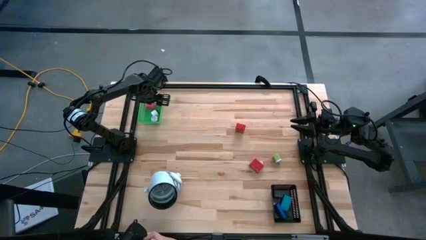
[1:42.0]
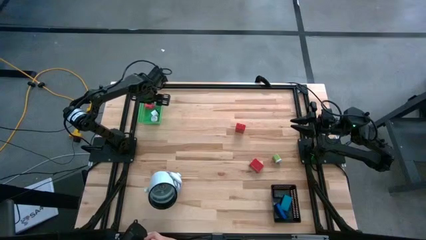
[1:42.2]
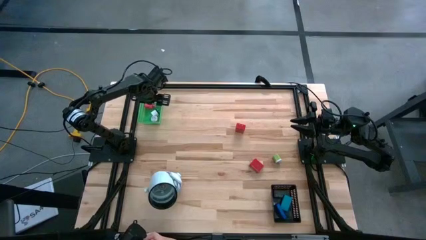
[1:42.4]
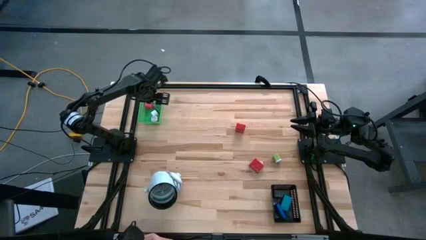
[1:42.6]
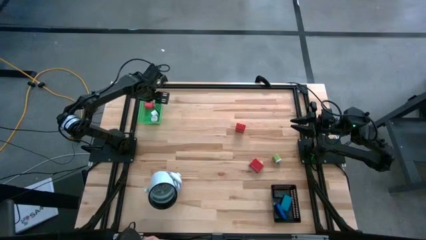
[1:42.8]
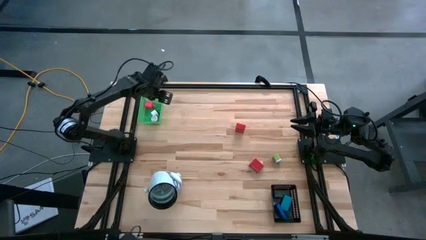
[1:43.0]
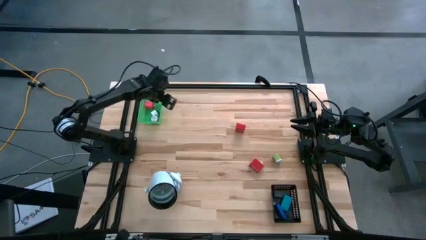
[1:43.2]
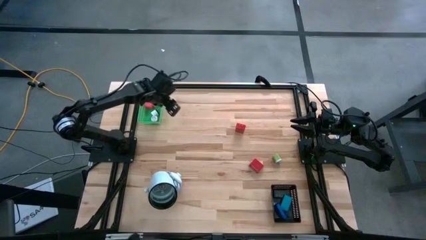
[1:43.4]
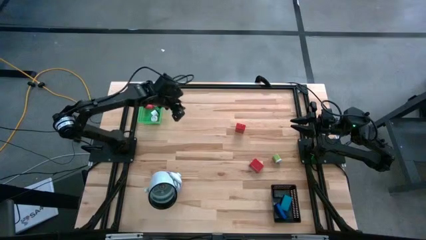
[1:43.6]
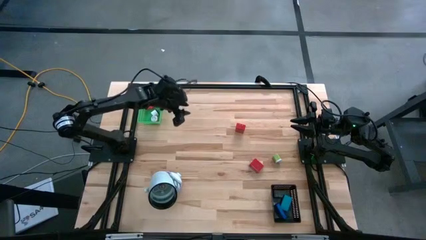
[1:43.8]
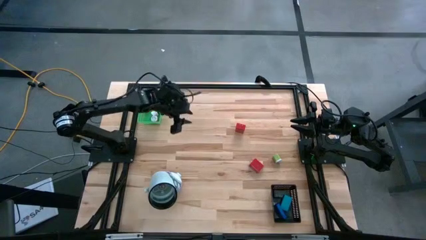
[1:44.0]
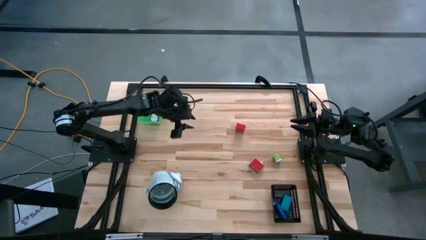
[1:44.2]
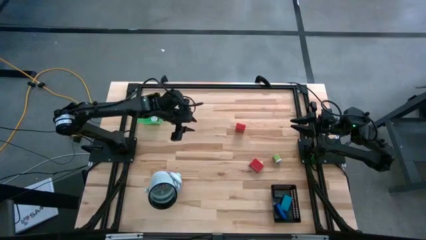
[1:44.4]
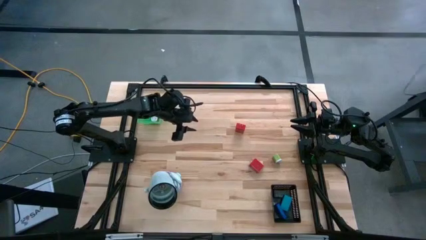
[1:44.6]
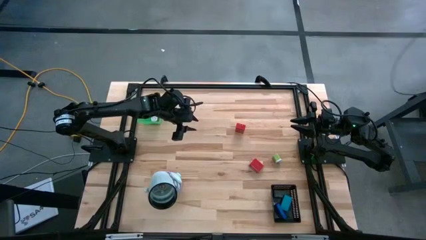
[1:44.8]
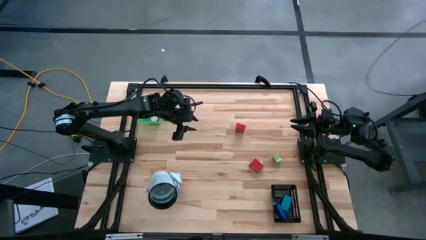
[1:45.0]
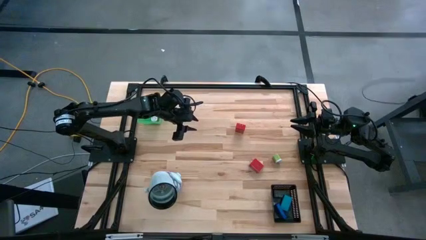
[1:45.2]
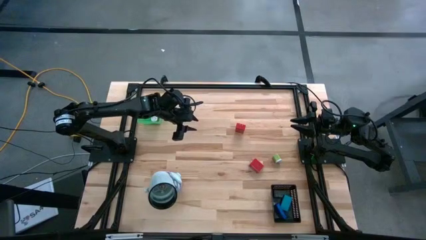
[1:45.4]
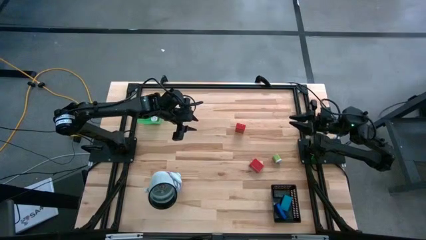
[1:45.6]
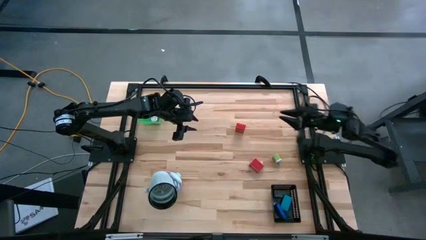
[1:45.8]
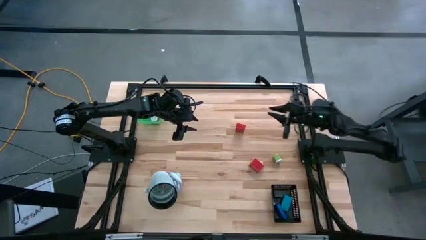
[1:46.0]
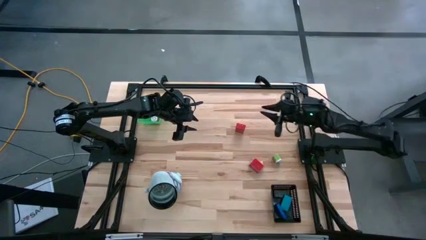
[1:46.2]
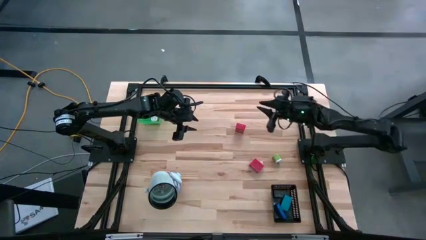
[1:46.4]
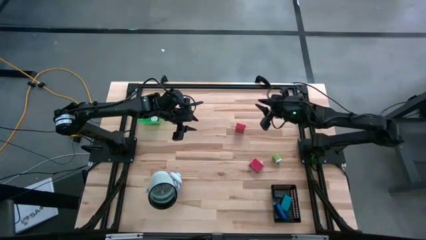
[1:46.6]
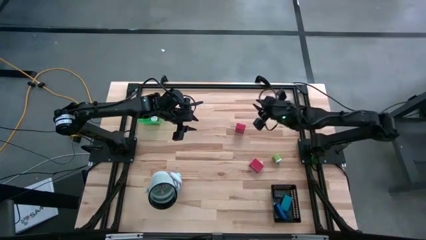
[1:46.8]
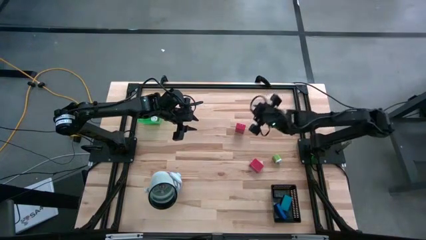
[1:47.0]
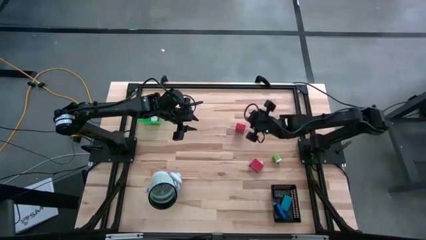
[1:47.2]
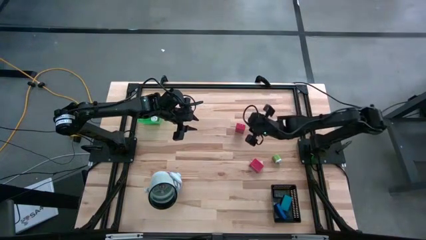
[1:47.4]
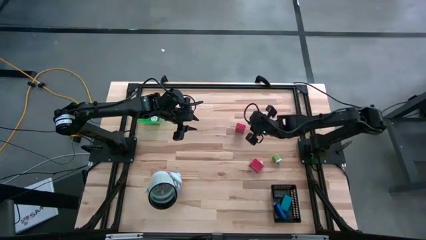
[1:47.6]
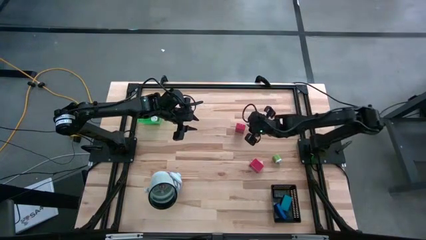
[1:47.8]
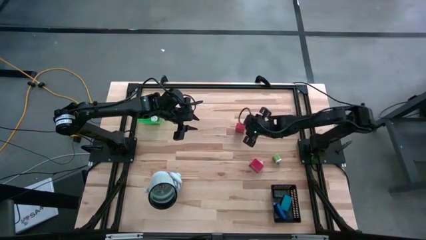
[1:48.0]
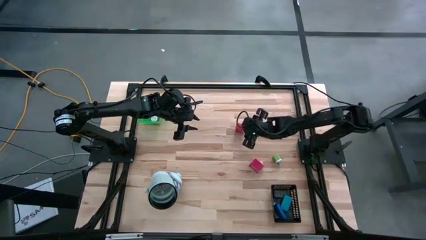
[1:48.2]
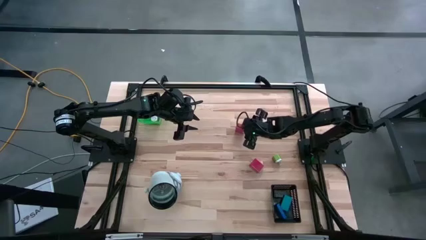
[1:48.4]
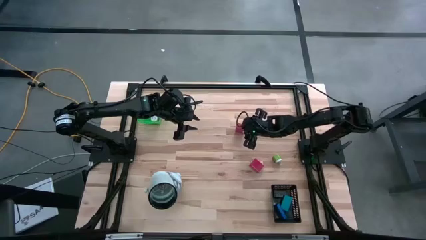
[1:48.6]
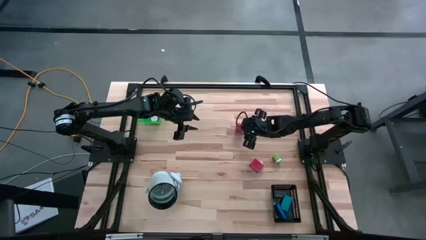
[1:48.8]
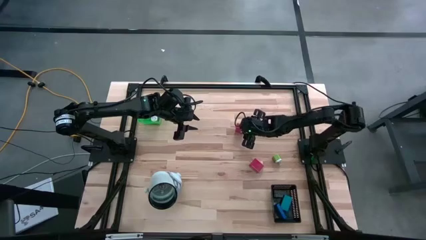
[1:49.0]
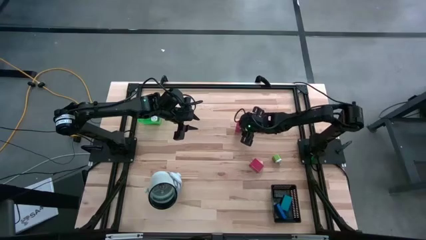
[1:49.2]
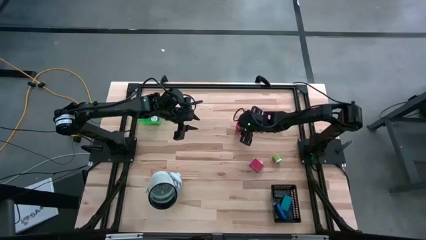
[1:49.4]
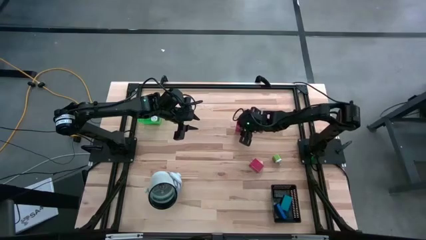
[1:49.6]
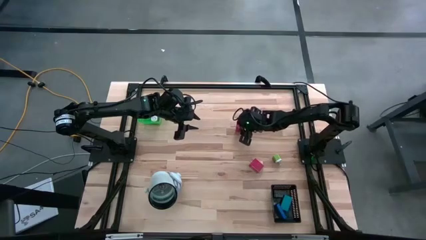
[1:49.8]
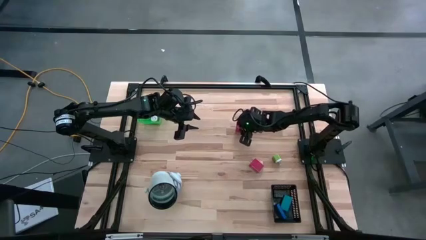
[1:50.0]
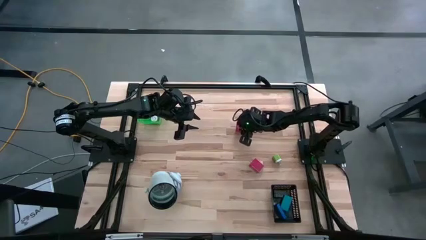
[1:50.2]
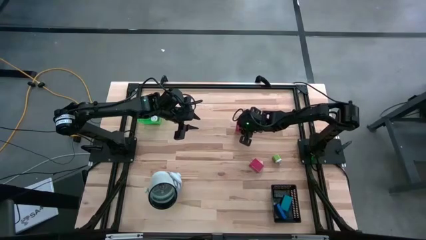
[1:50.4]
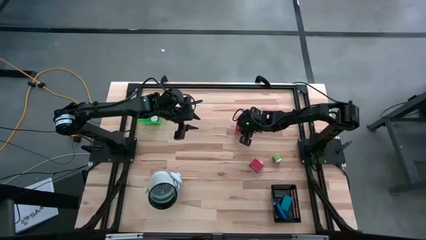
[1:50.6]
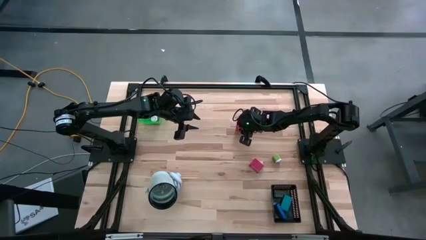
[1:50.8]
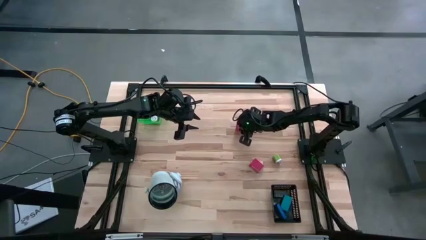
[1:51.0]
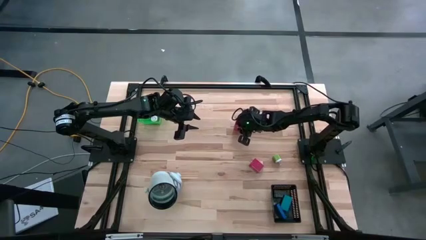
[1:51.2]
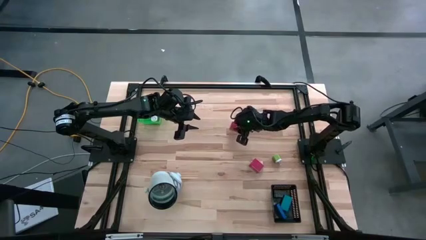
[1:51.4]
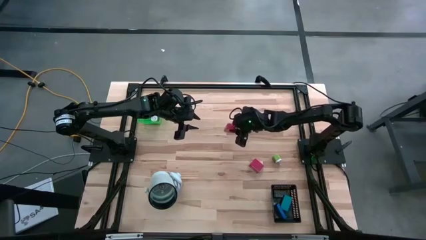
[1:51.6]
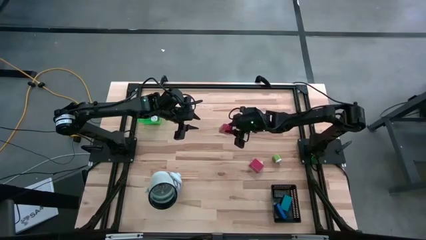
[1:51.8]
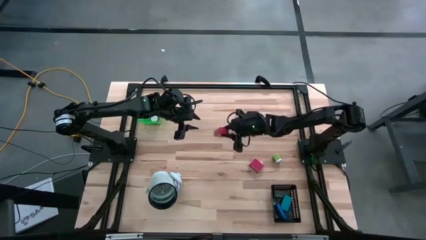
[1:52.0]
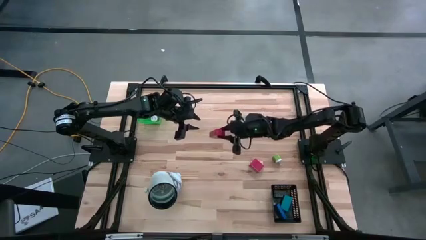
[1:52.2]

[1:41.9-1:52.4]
Task: Pick & Place Office items
Put the top red charger adapter into the green bin

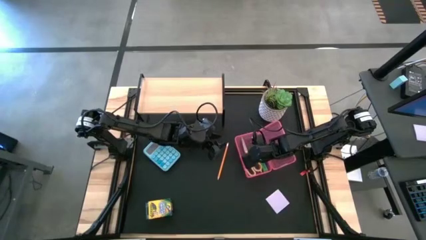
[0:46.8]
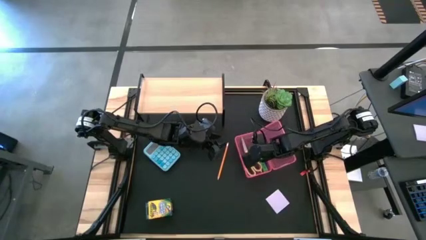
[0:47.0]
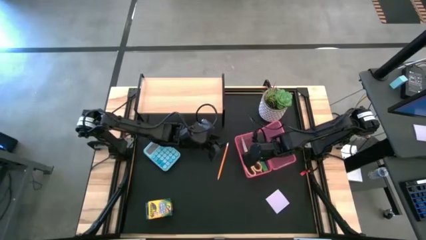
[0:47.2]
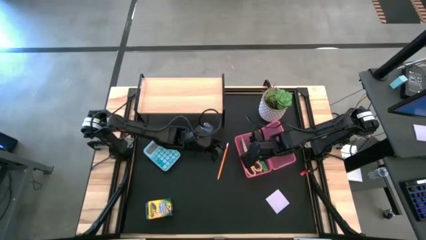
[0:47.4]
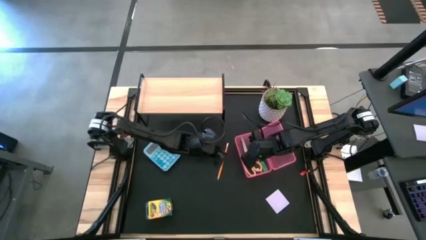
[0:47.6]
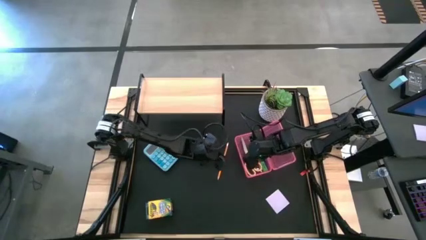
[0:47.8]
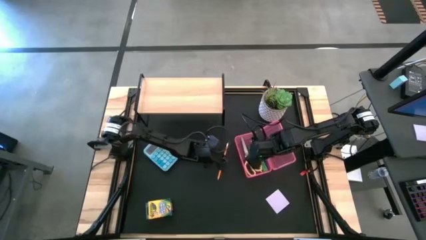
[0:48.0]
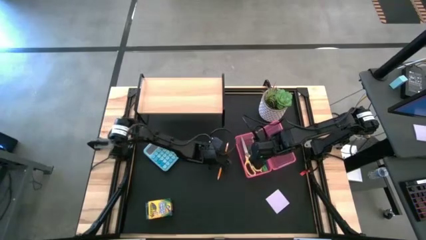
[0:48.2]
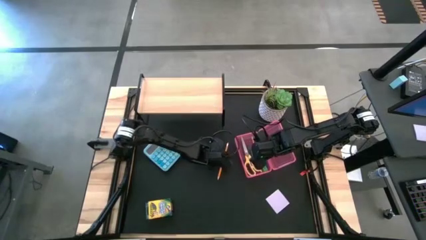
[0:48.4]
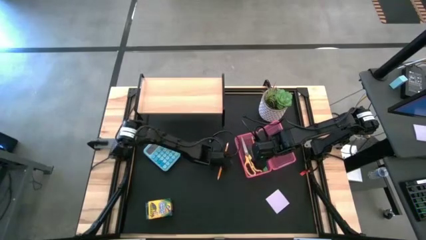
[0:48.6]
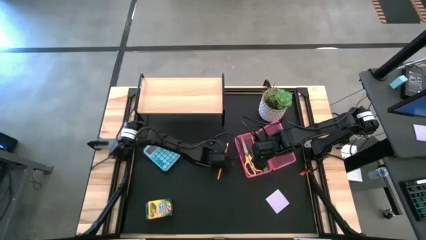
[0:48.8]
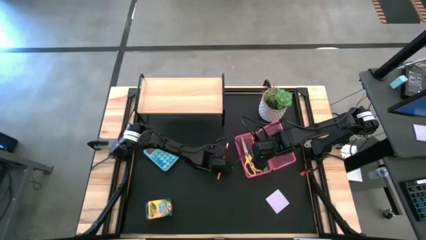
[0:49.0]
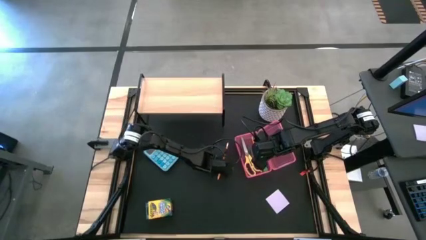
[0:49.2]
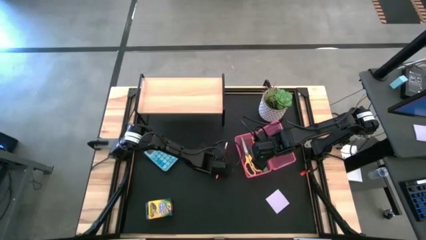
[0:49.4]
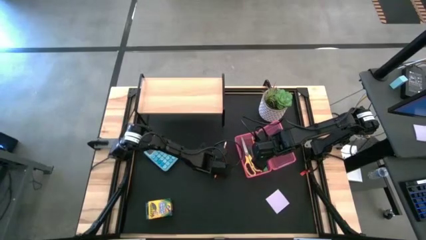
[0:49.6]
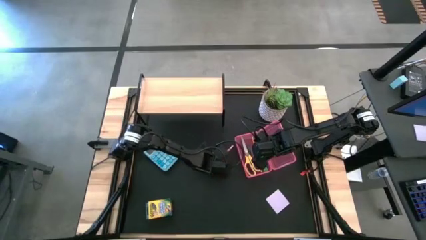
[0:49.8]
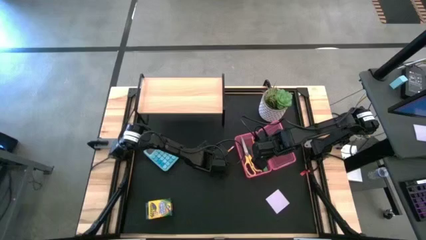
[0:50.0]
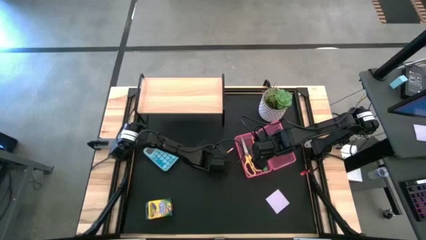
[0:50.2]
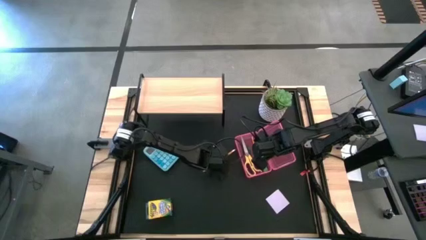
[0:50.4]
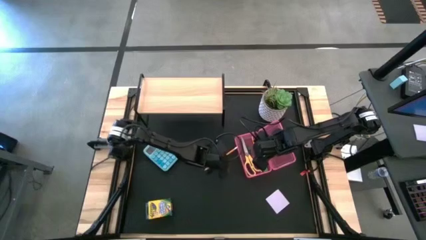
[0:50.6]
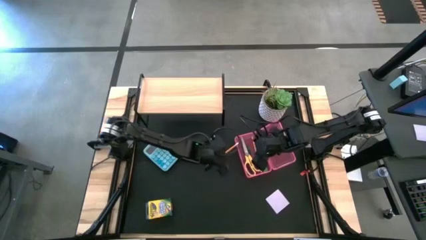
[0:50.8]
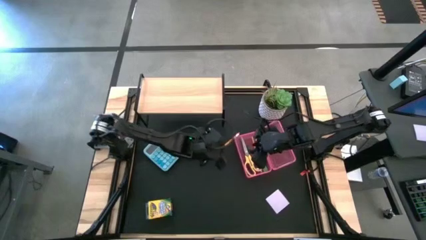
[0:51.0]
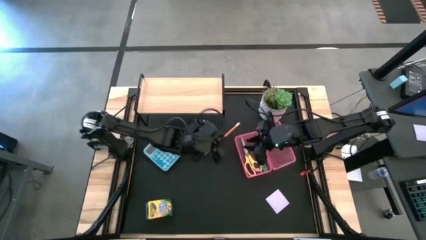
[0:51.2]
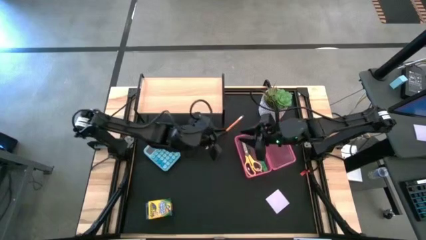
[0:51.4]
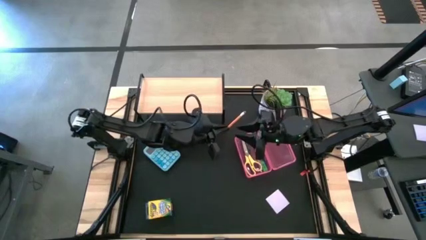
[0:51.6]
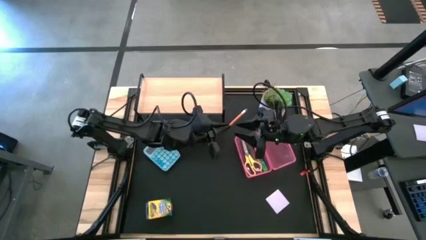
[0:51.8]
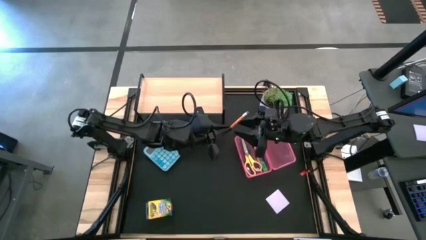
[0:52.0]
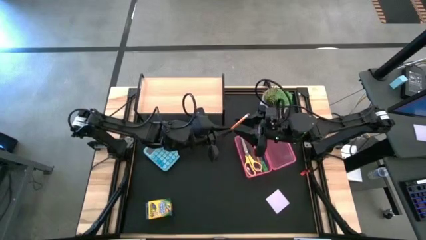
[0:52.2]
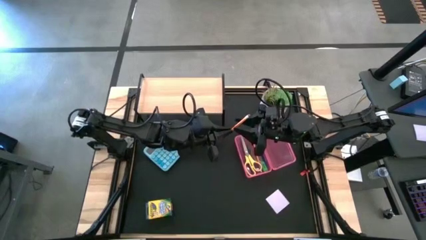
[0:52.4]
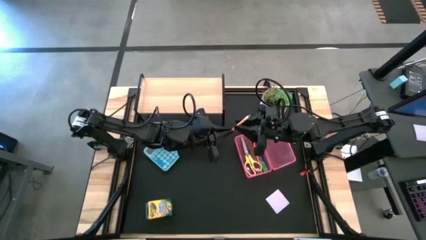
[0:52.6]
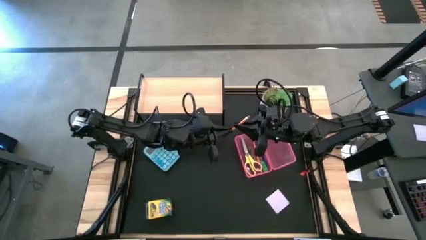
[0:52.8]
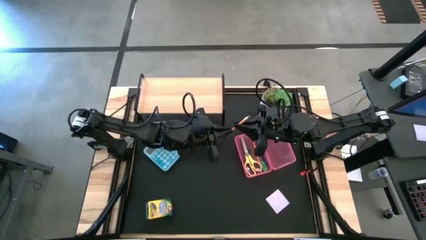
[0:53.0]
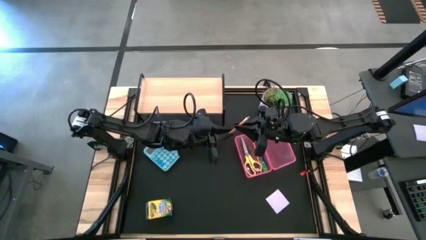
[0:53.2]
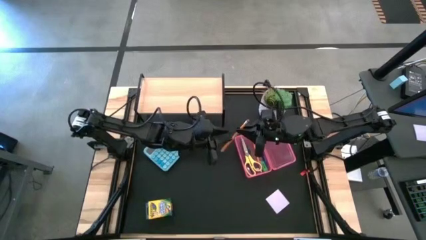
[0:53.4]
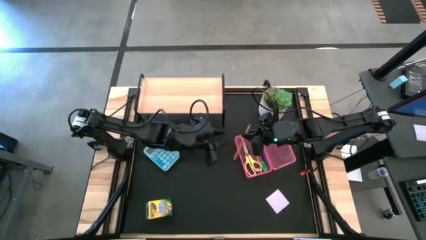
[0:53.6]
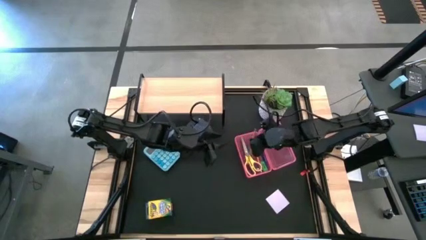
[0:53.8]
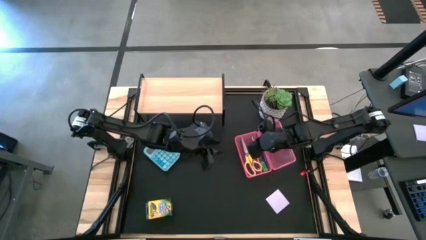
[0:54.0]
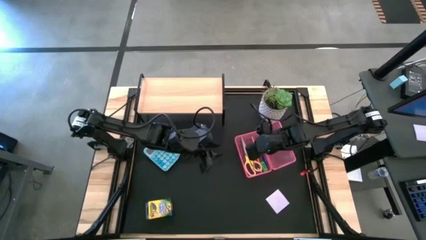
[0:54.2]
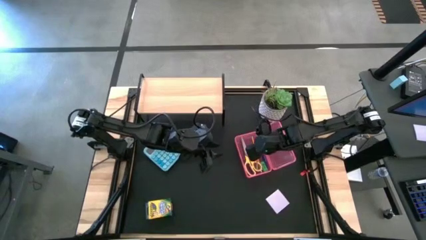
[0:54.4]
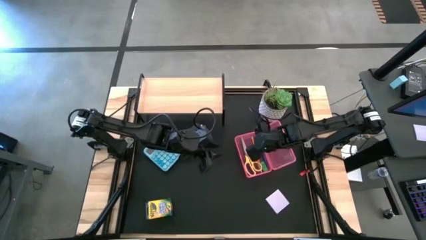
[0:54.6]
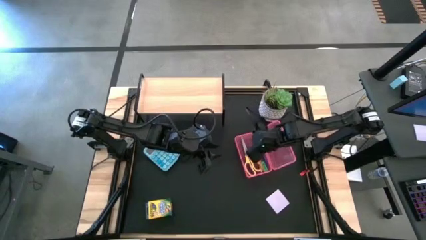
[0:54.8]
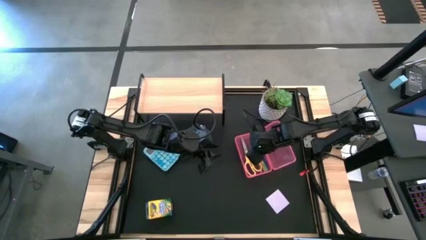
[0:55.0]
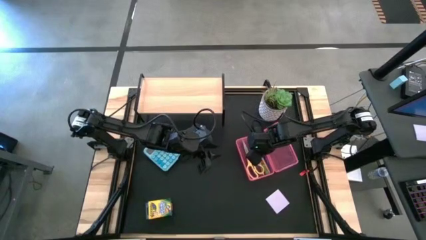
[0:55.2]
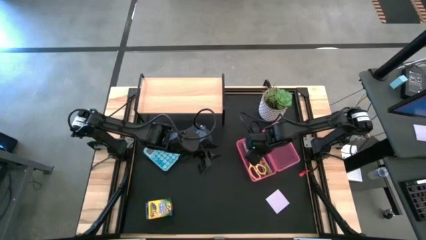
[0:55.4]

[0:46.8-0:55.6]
Task: Pack school essentials
Put the orange pencil into the pink supply box
